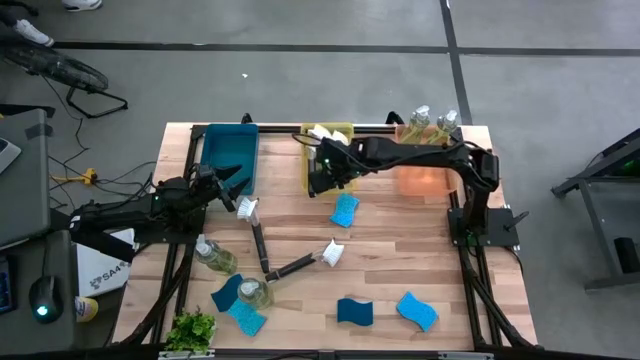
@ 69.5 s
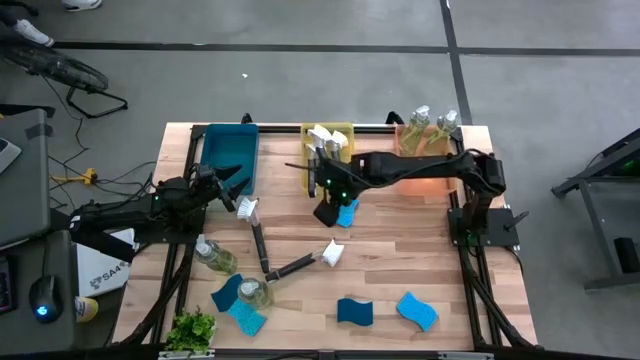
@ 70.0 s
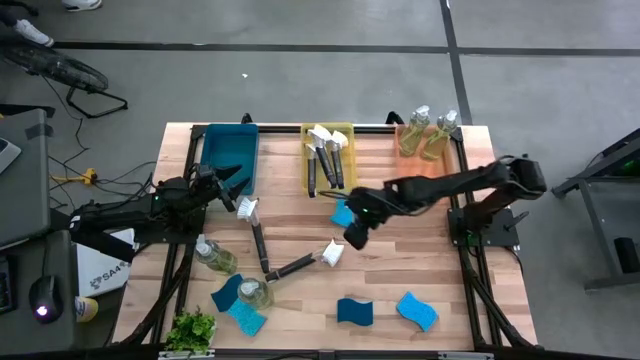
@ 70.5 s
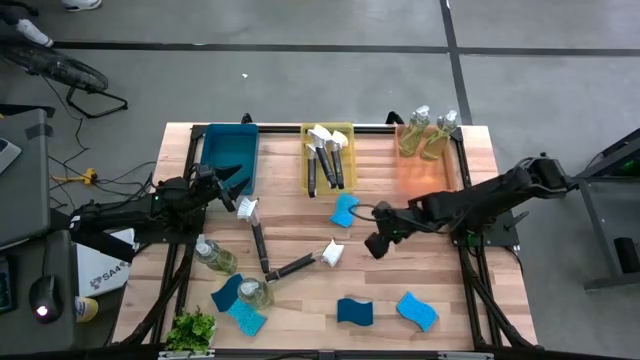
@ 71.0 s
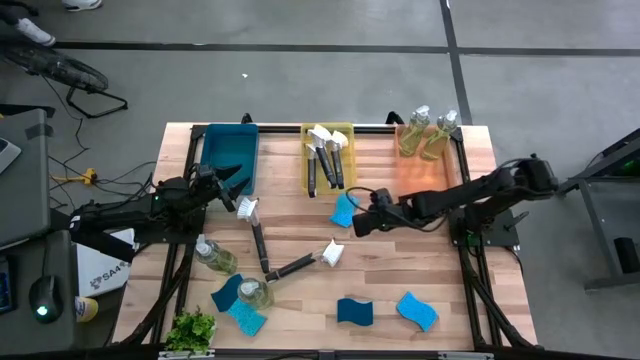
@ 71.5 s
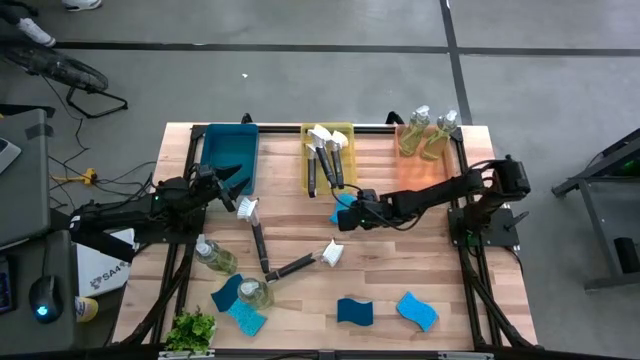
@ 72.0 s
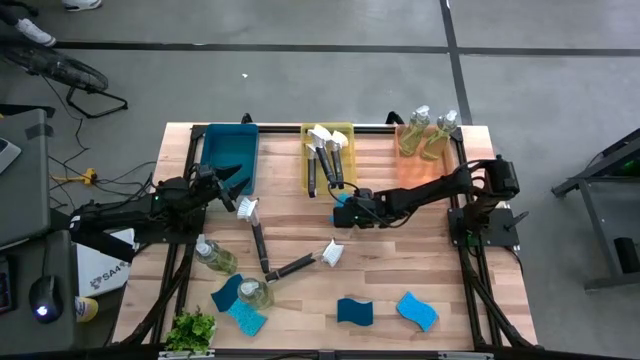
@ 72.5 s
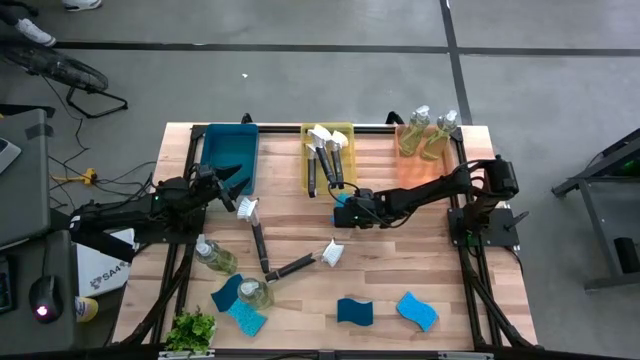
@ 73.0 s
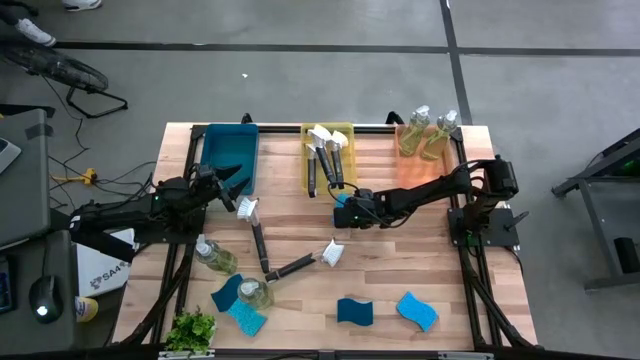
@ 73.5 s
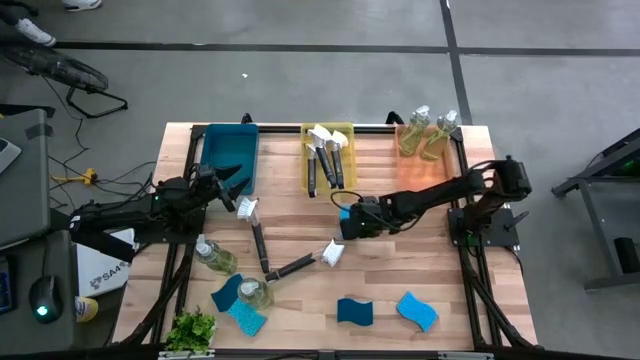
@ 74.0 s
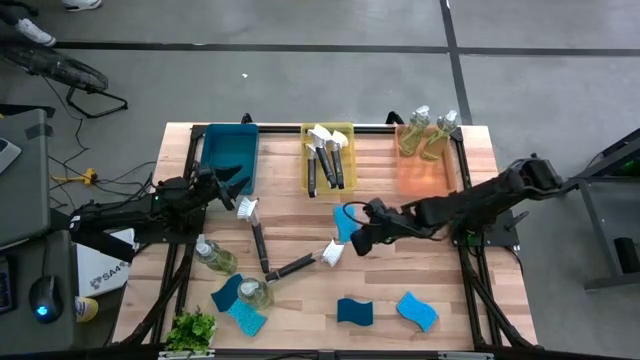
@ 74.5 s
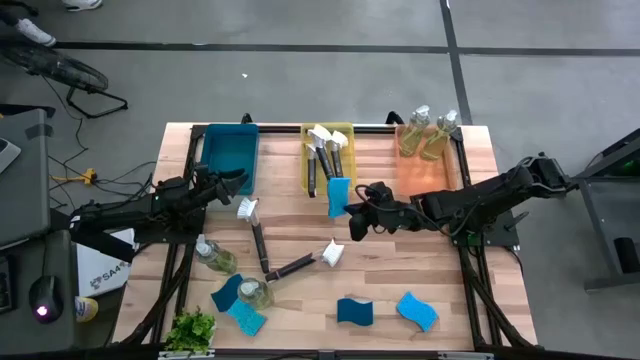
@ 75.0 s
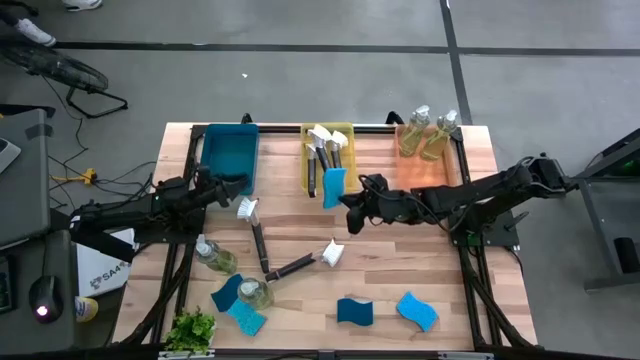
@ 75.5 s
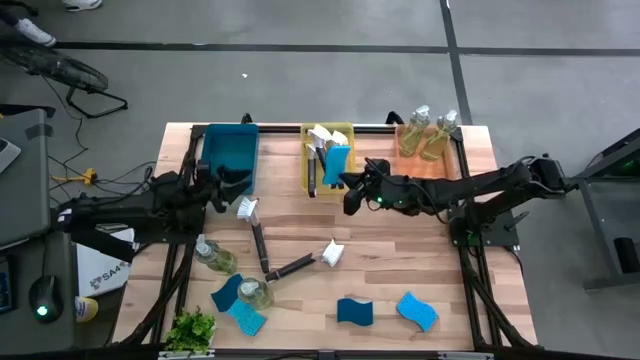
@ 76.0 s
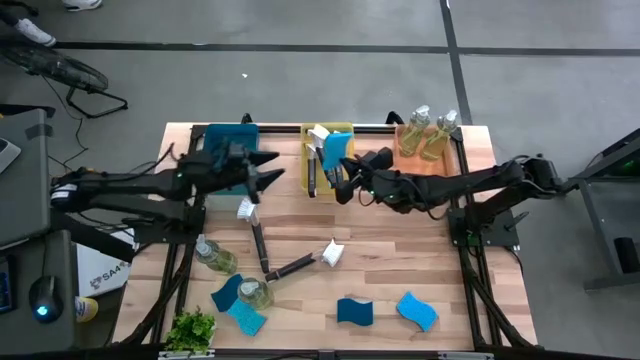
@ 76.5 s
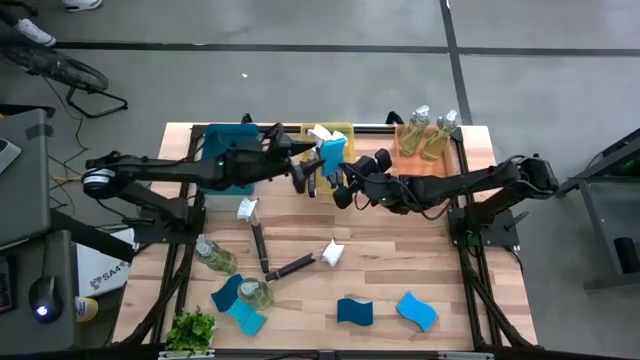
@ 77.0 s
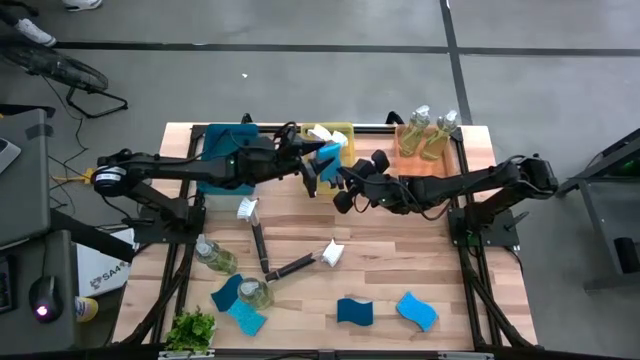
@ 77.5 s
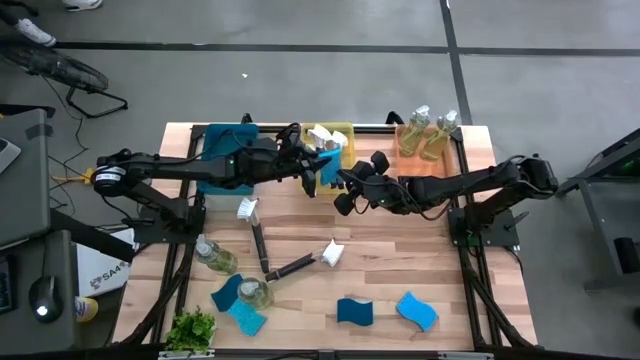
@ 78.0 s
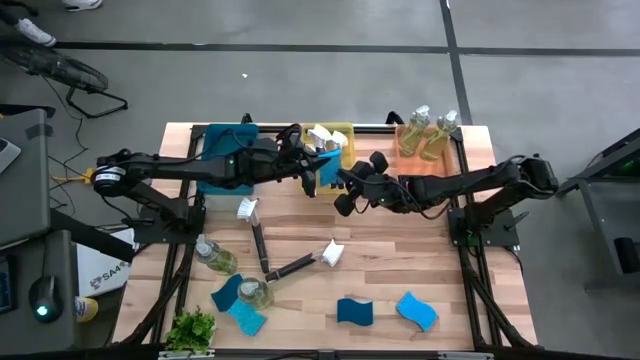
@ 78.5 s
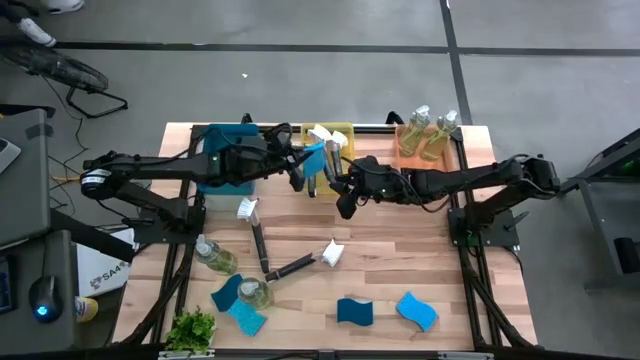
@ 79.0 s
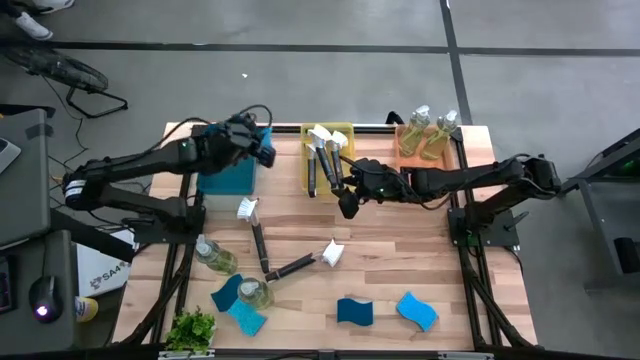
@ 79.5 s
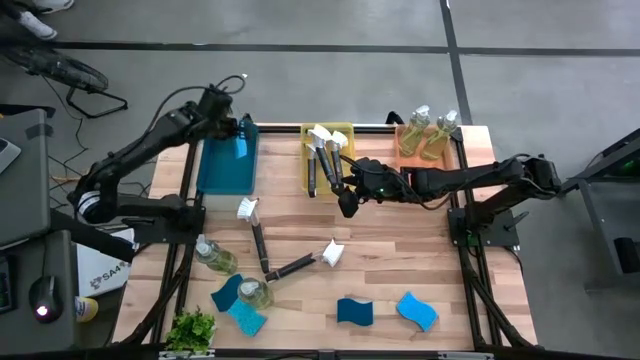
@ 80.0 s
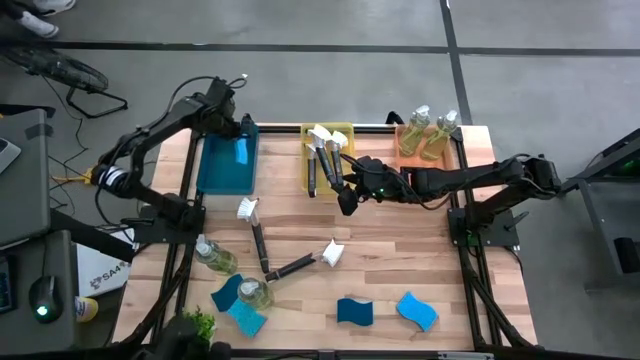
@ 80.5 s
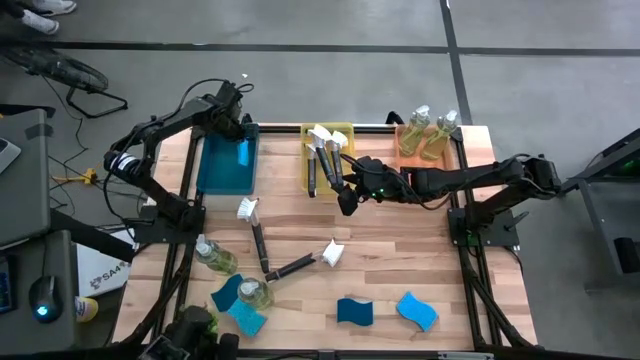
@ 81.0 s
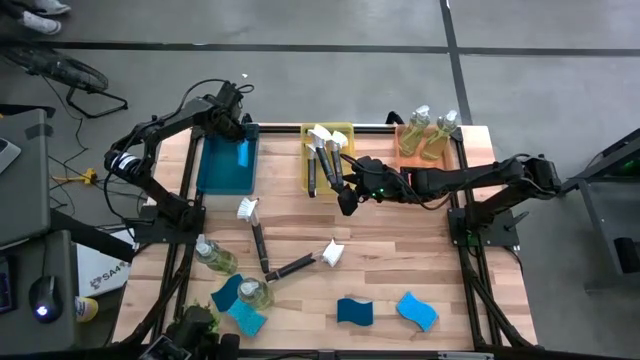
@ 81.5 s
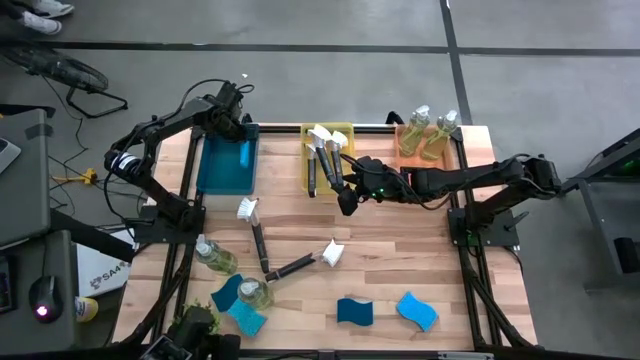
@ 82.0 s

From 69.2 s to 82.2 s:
Task: Pick & Place Kitchen Sink Supplies
Put the blue dishwashing sponge into the blue bin
